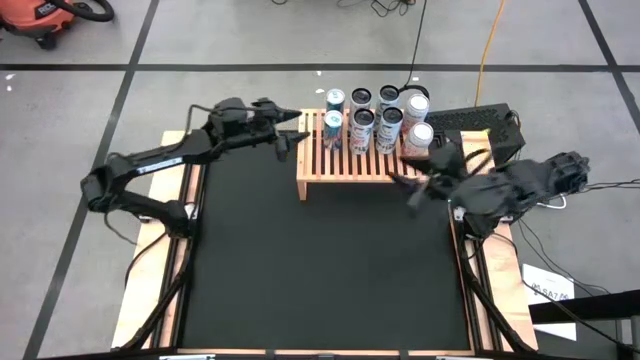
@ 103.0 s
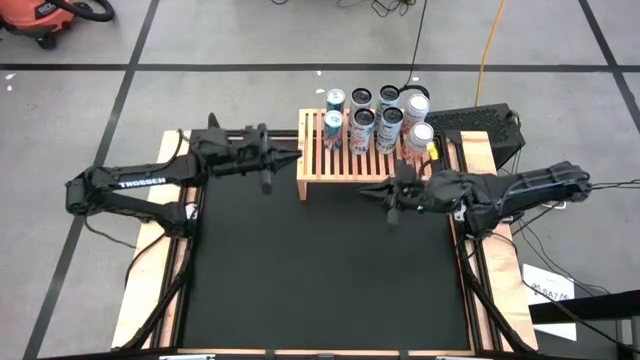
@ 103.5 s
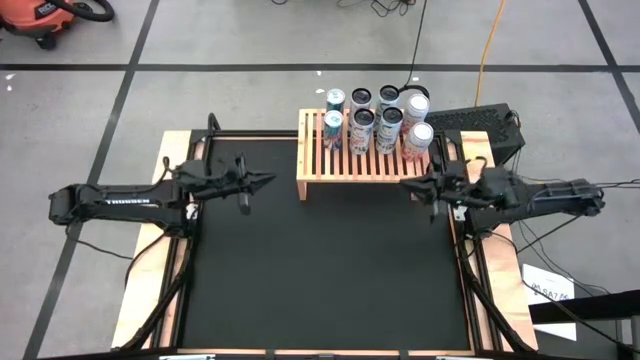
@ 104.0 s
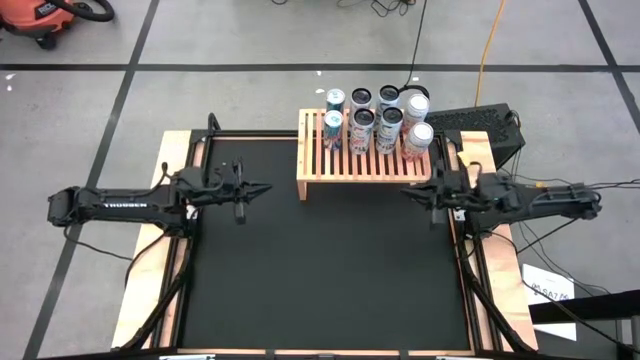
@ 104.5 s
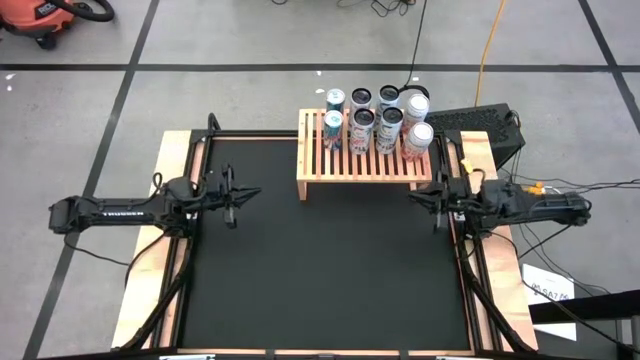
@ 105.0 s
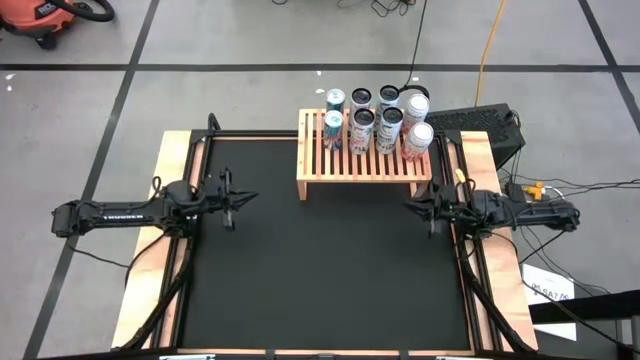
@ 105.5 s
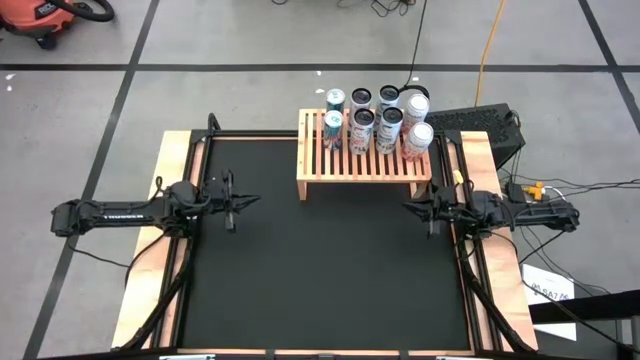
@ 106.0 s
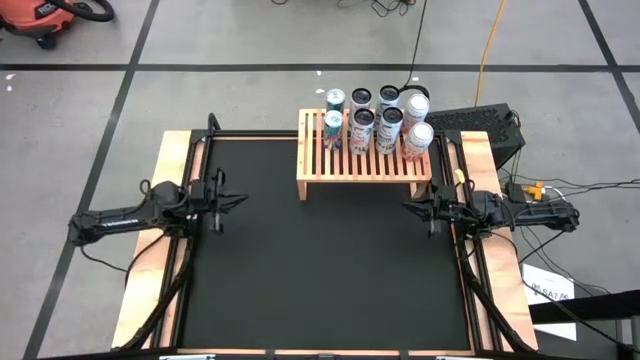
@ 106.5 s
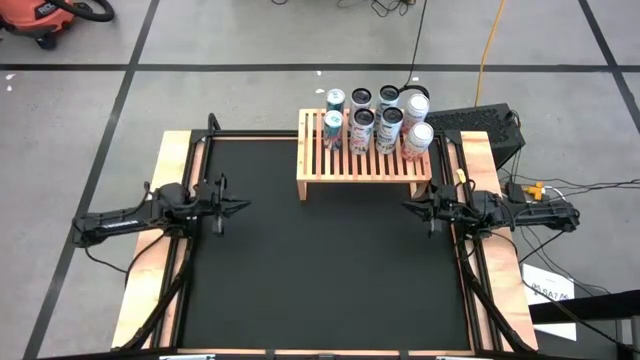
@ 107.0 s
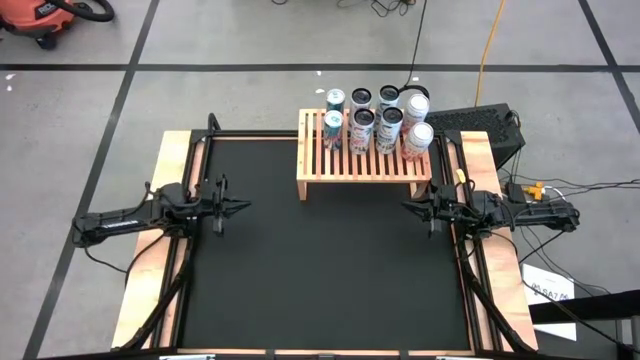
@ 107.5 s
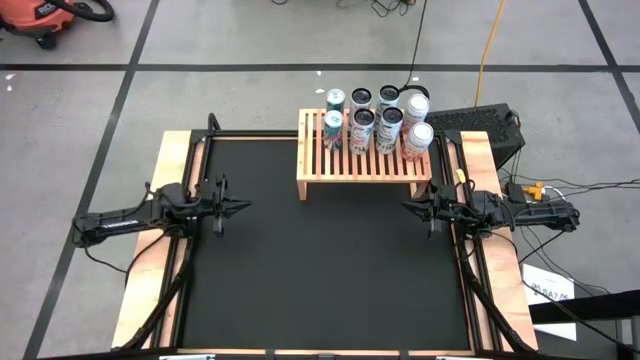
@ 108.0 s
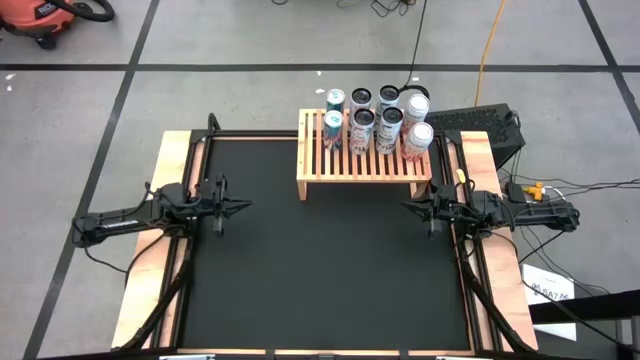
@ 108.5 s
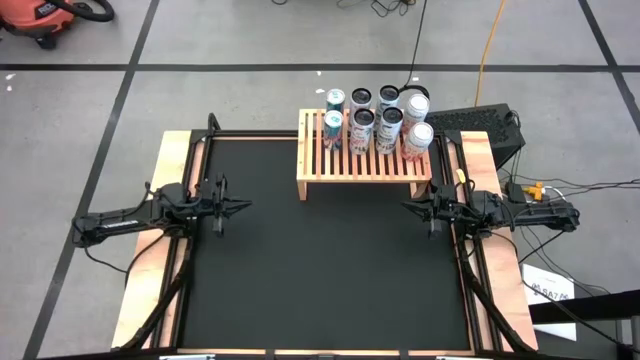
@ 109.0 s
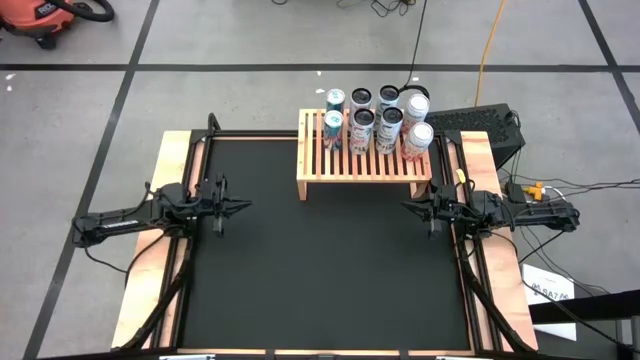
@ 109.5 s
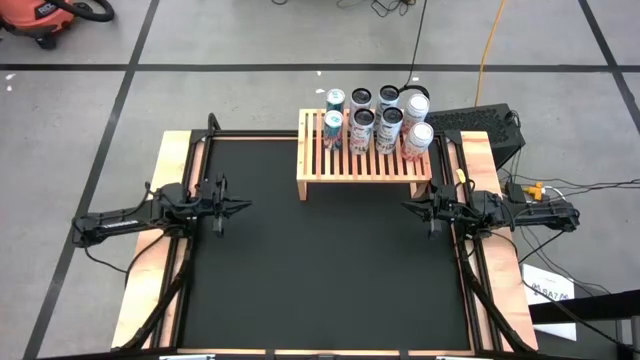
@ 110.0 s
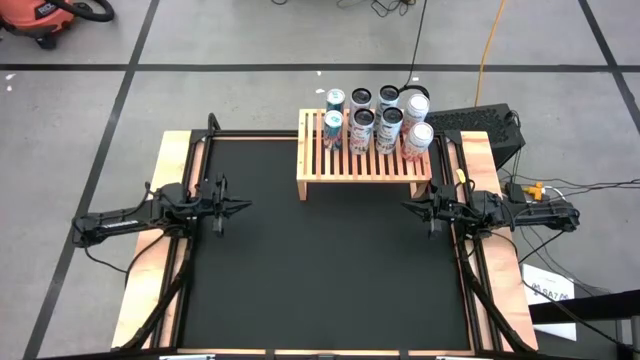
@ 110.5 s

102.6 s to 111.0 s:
Task: Place canned beverage on shelf
Return to Home Position

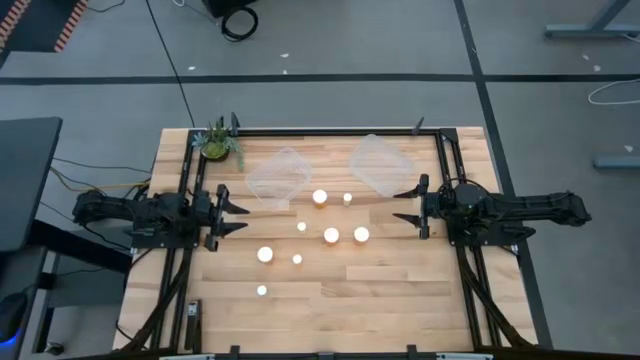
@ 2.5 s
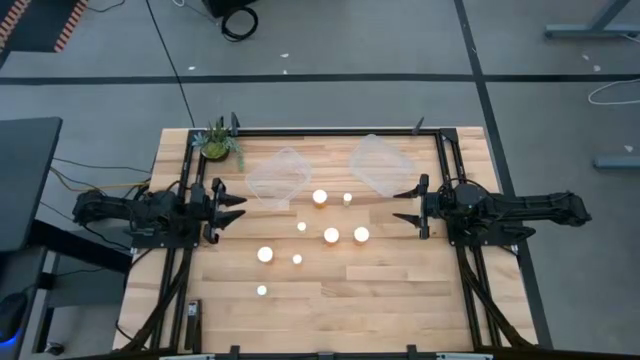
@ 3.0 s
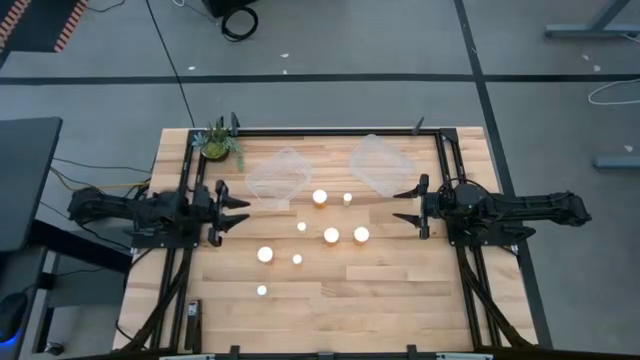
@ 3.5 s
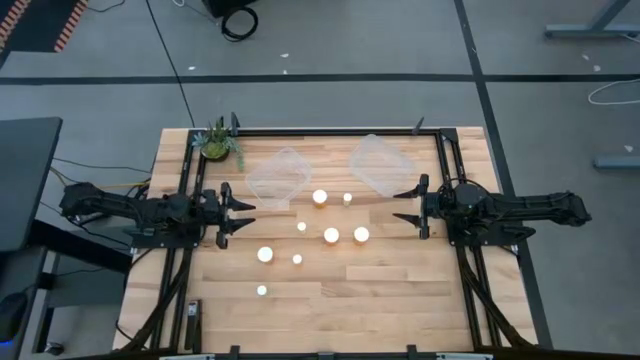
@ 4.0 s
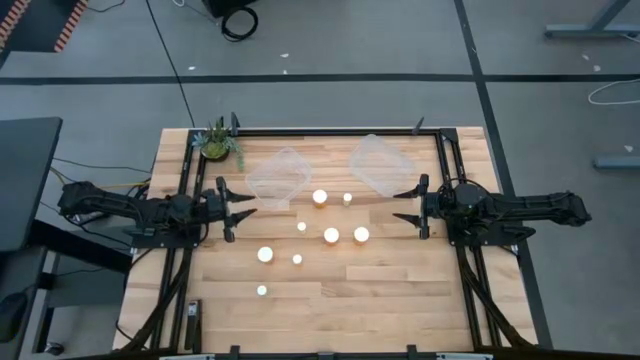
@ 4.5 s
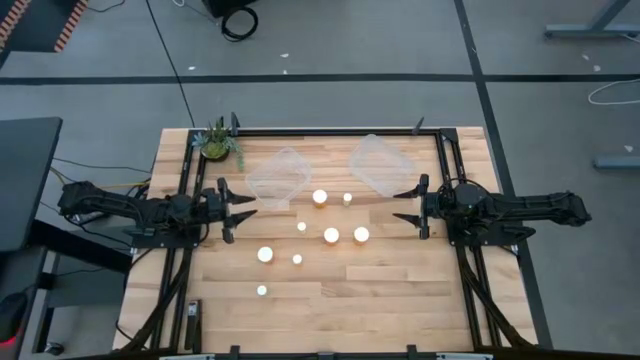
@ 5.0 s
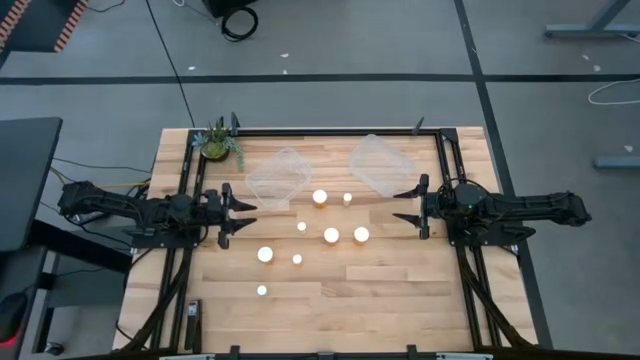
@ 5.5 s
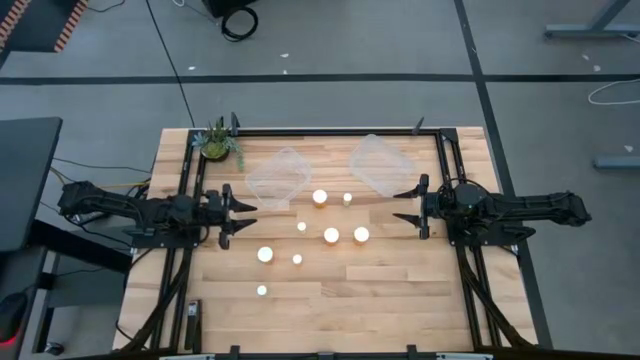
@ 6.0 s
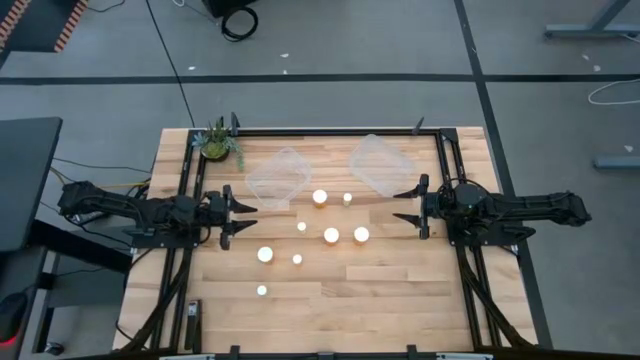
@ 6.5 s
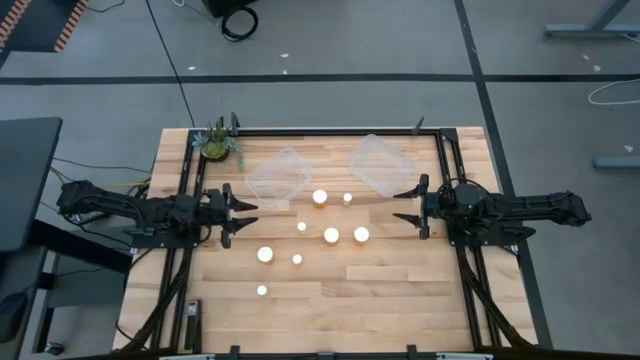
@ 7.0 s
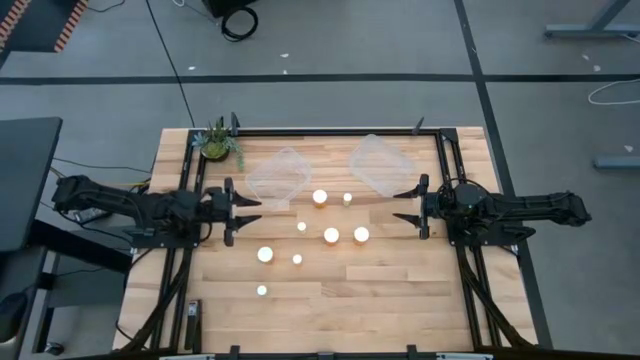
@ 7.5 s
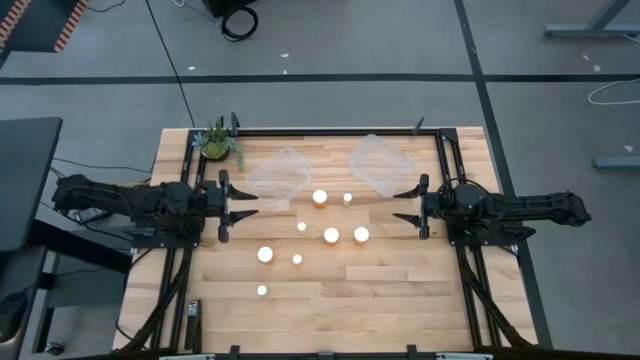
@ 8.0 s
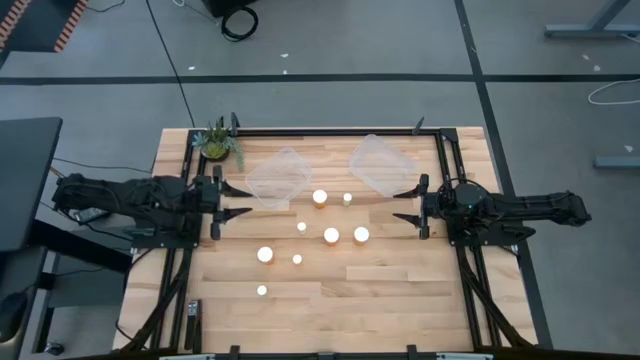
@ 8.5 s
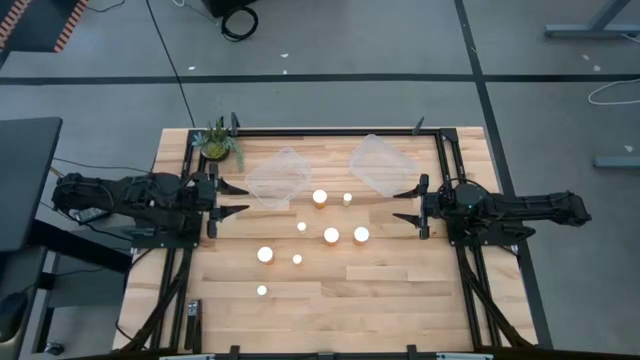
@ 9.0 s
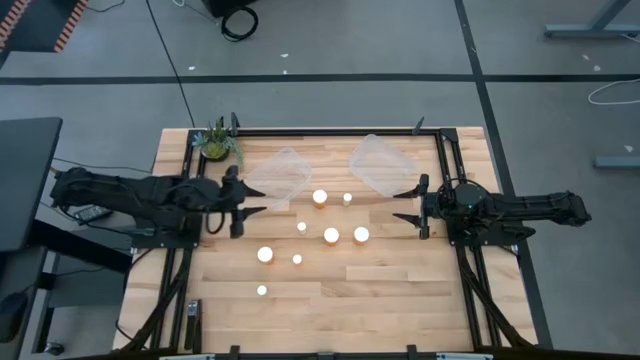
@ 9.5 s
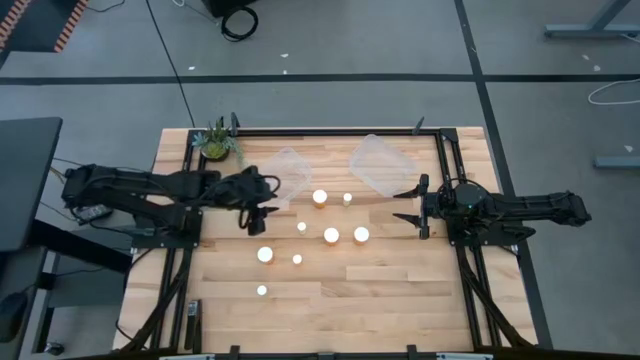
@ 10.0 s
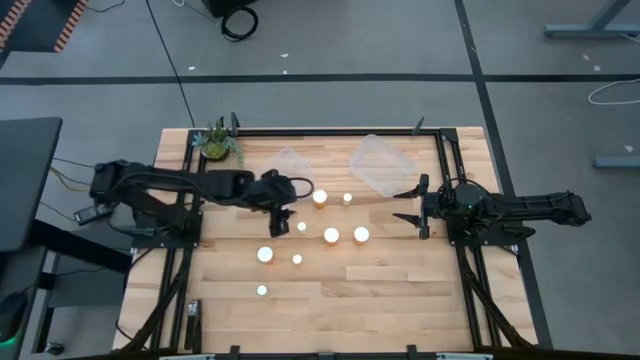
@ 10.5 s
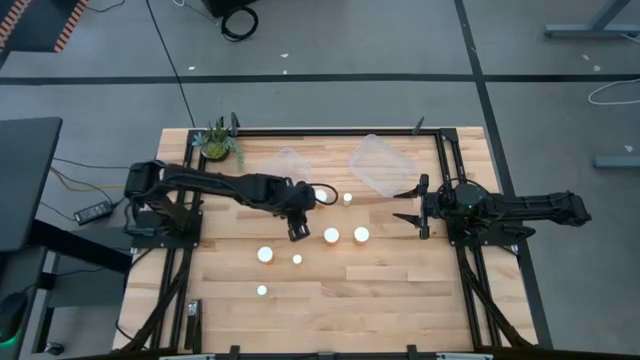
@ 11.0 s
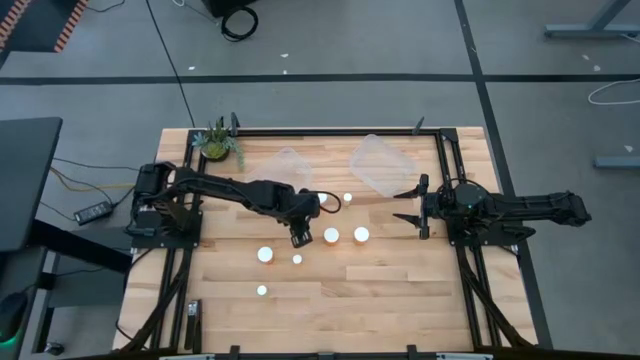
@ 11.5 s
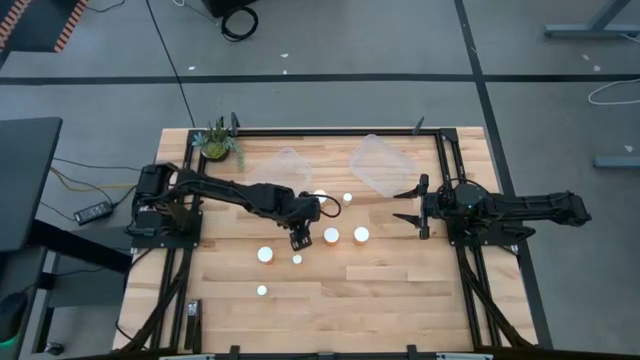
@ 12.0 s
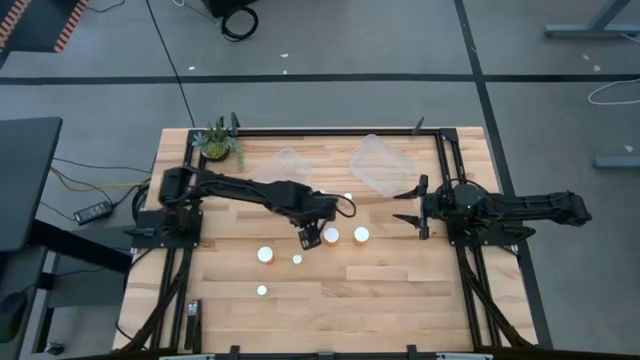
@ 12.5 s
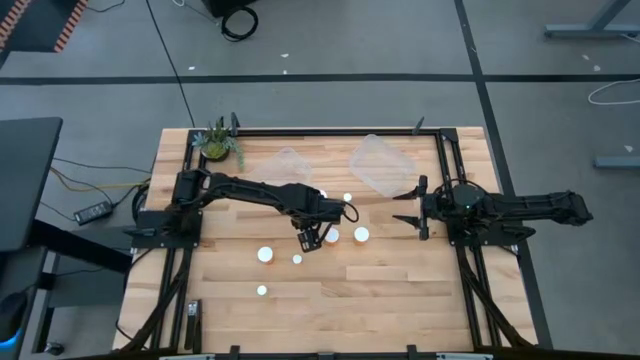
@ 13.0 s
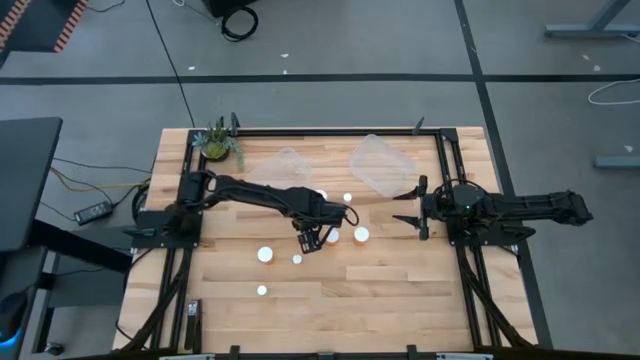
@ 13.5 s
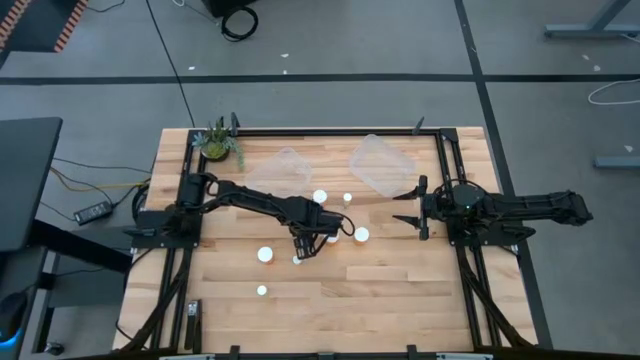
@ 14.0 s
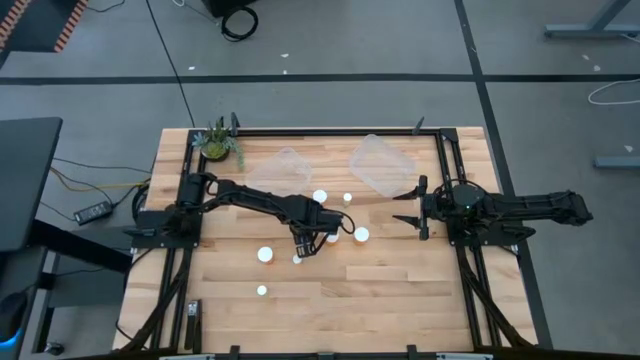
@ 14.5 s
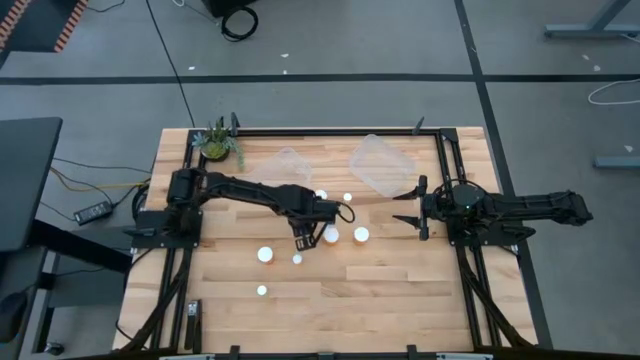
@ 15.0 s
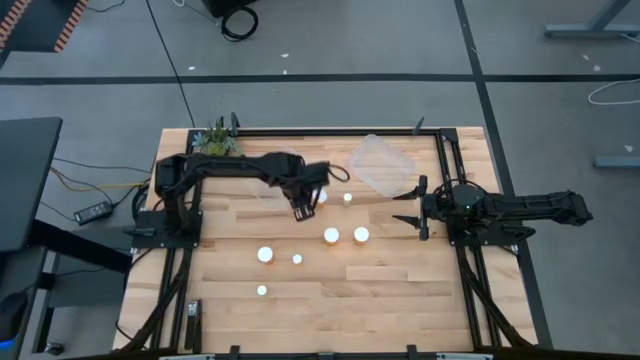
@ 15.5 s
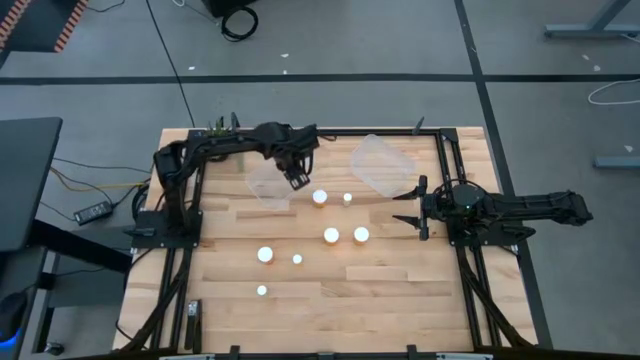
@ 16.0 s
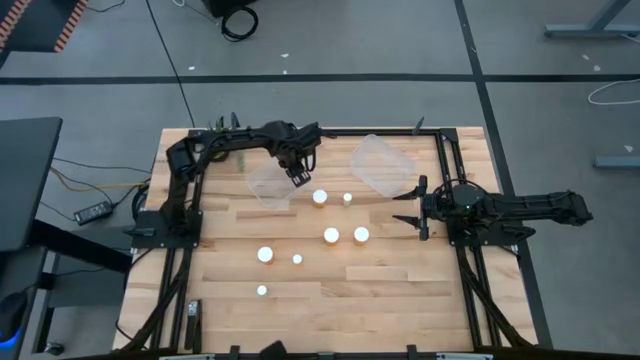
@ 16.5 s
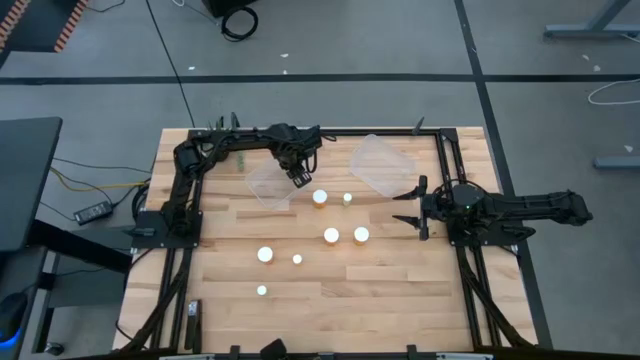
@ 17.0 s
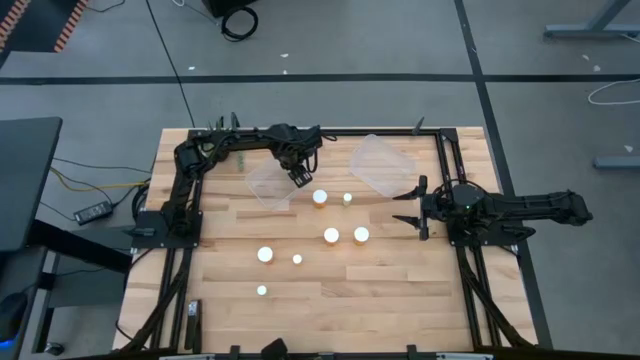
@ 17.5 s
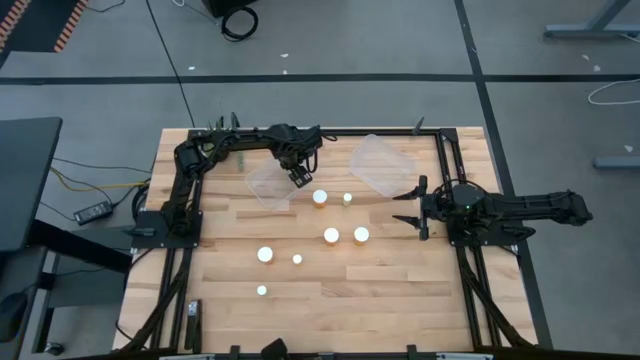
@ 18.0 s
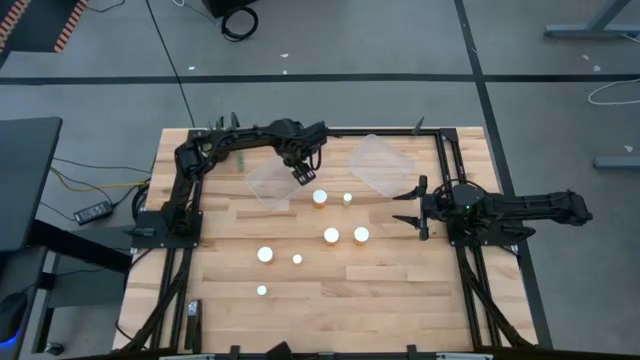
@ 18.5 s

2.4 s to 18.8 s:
Task: Pick and place medicine bottles into bin by pill shape (circle, oval)
Put the middle small yellow pill bottle into the left transparent bin
